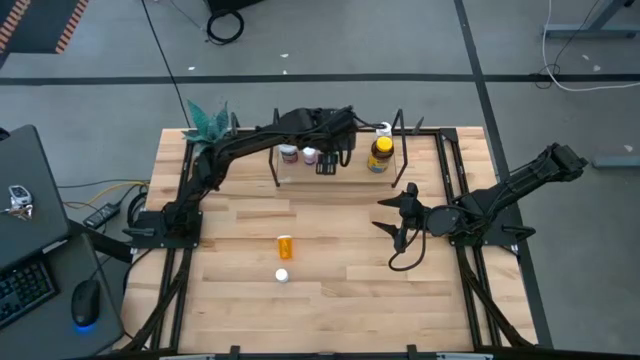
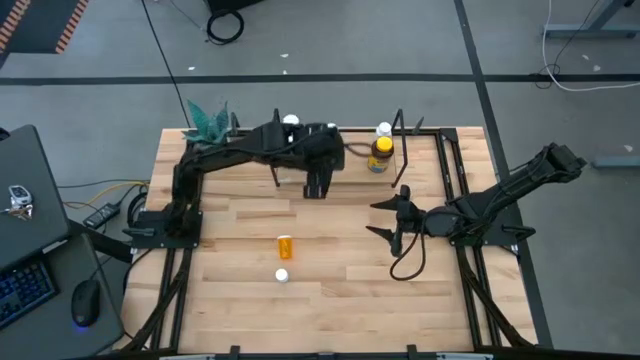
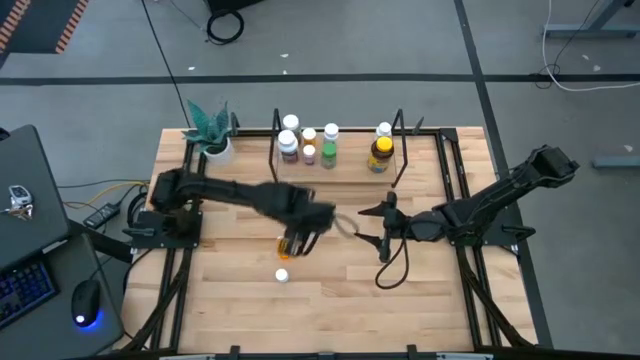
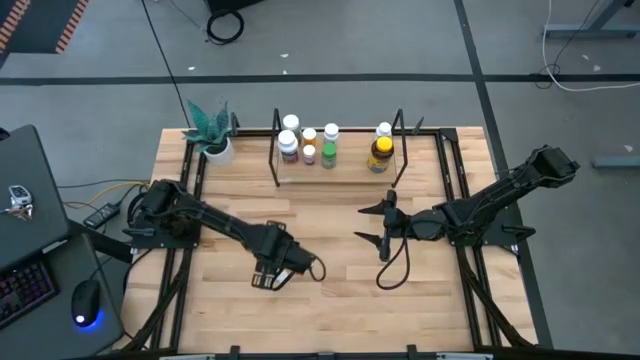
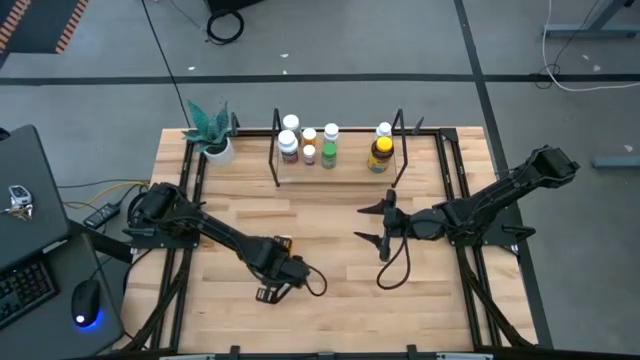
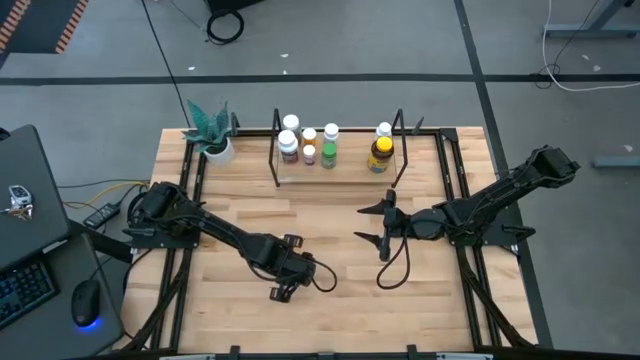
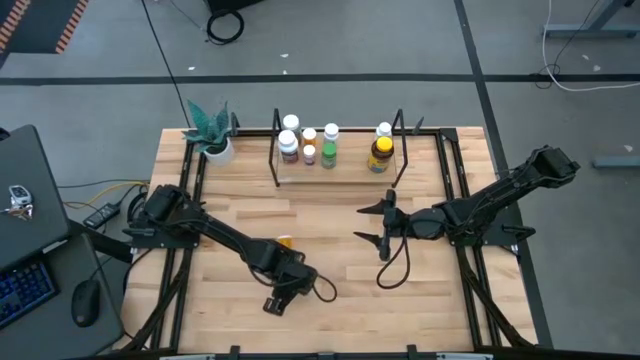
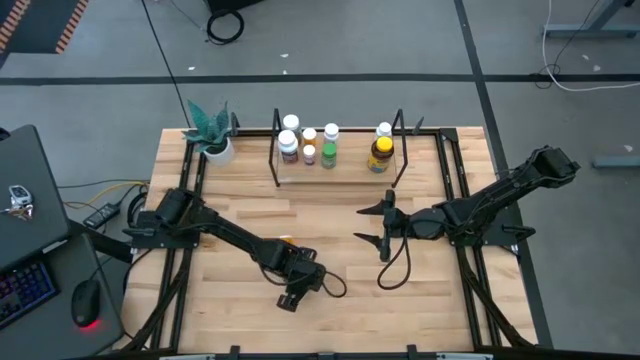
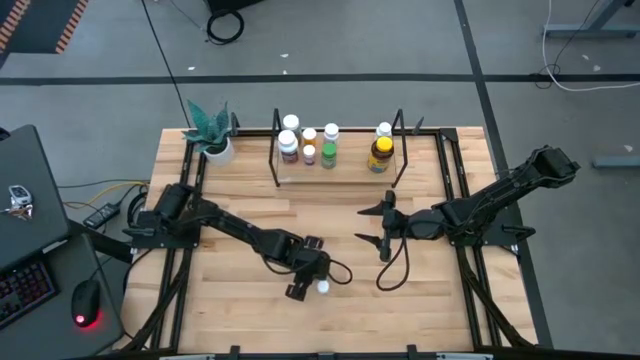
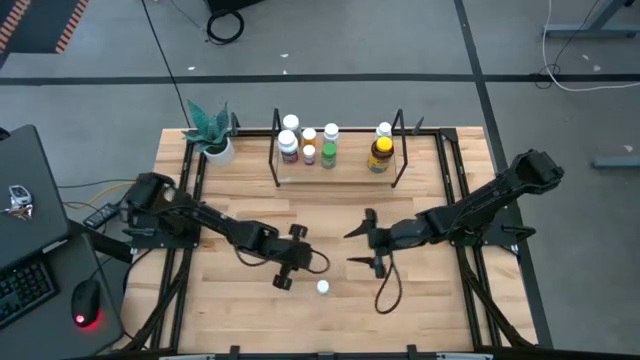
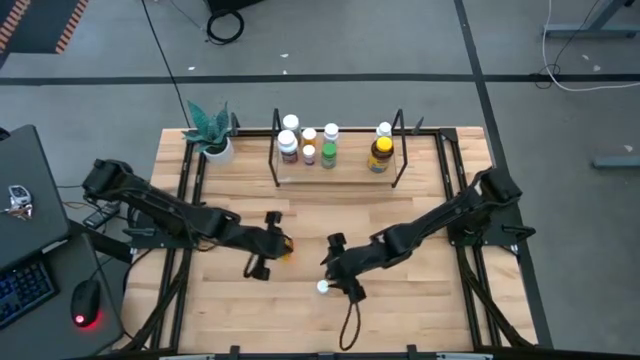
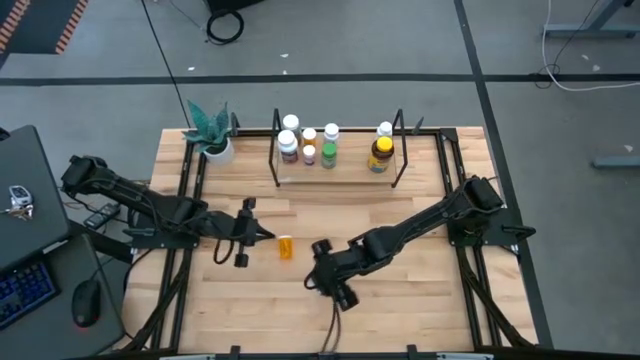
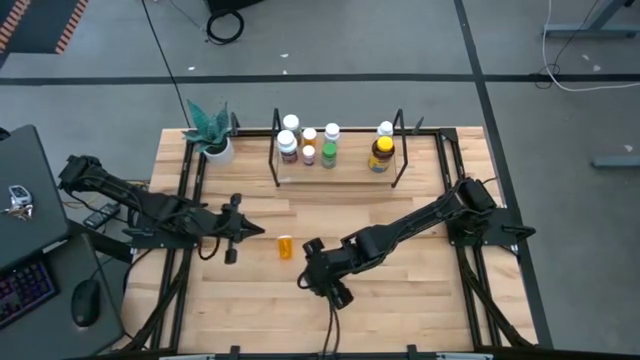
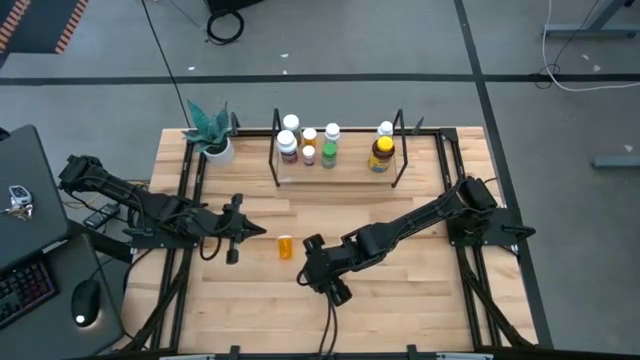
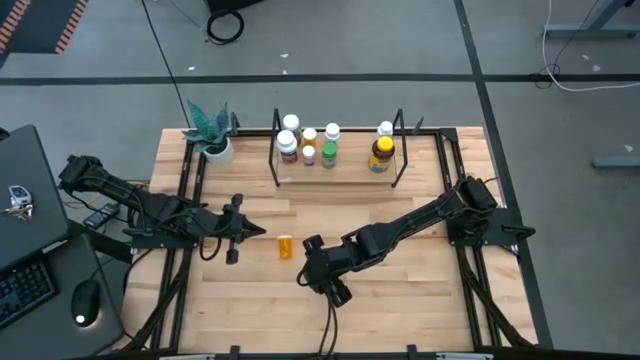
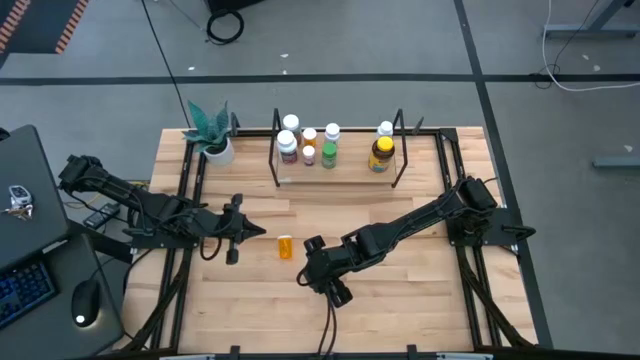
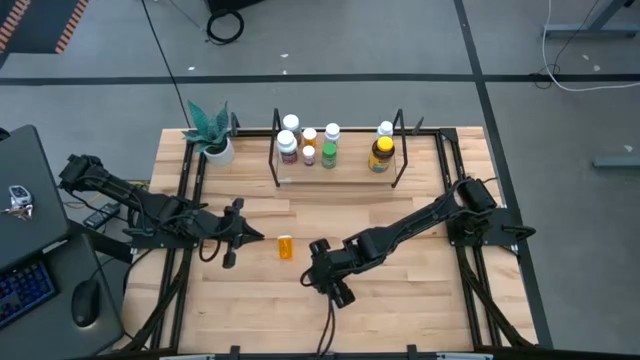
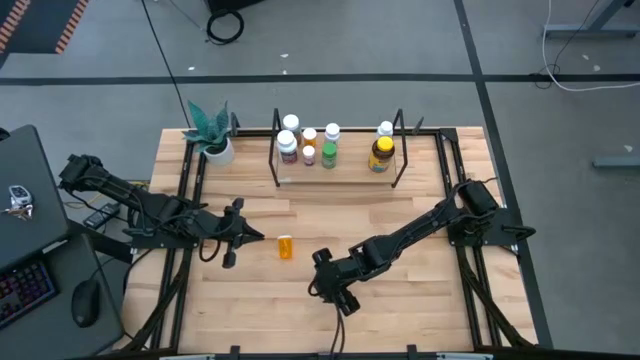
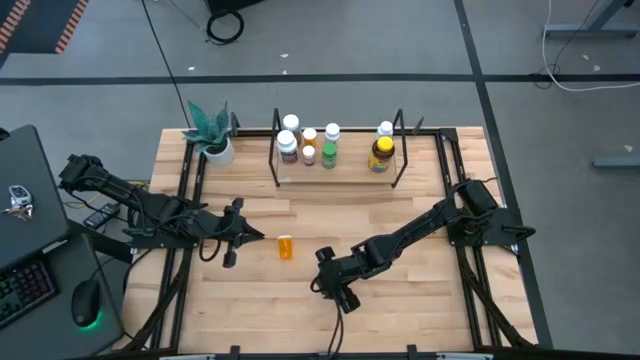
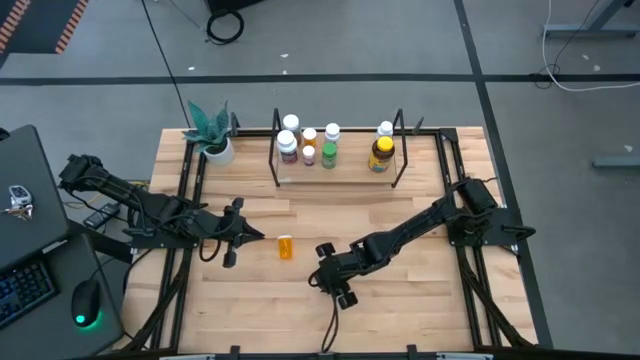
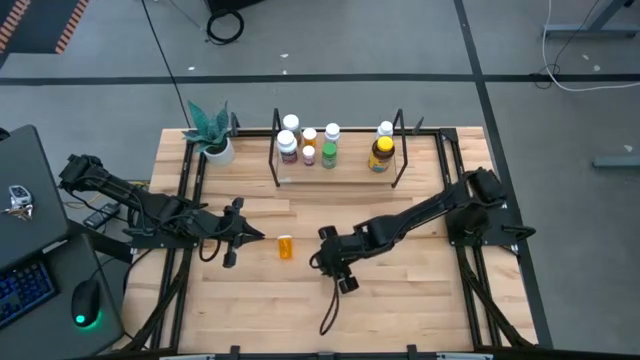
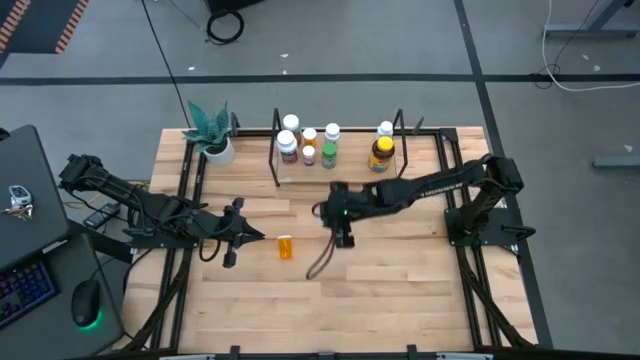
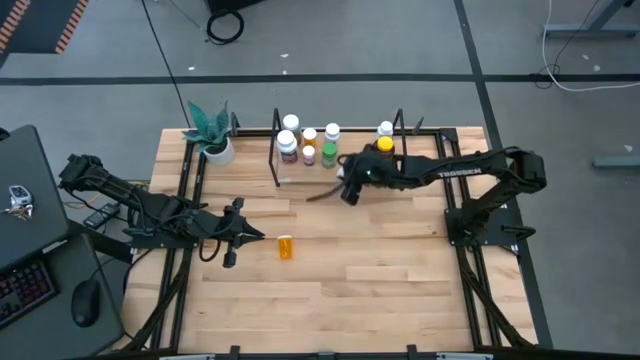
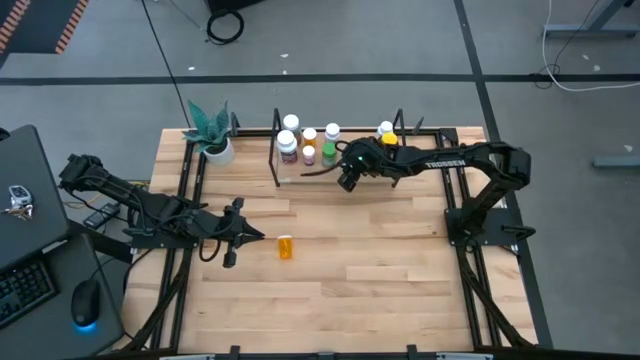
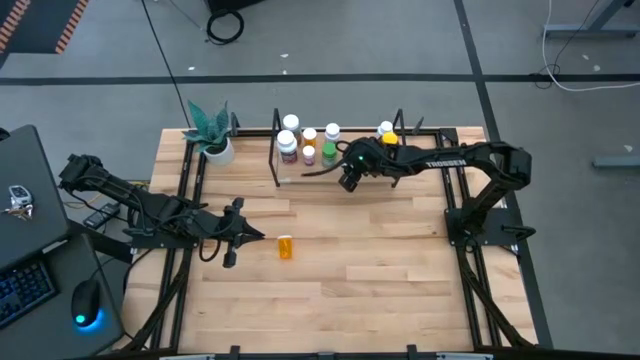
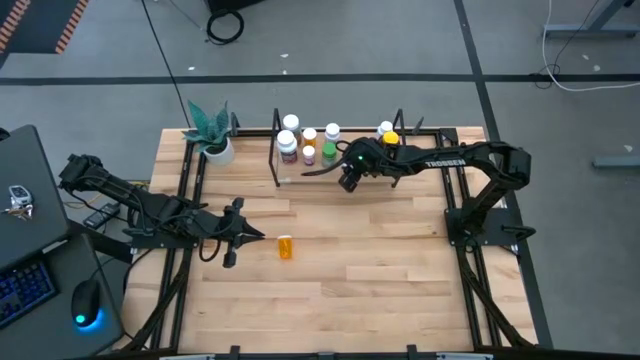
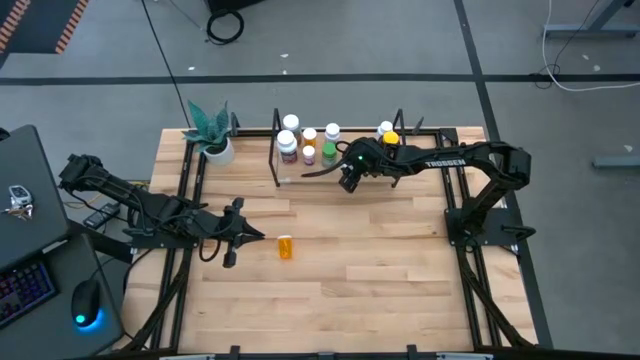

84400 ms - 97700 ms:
Task: Pick and place medicine bottles onto shelf by color
Put the white pill bottle on the shelf

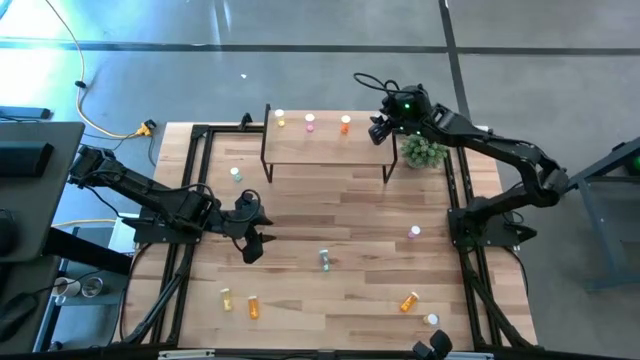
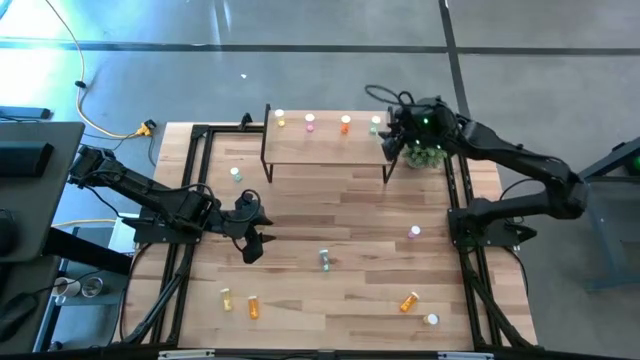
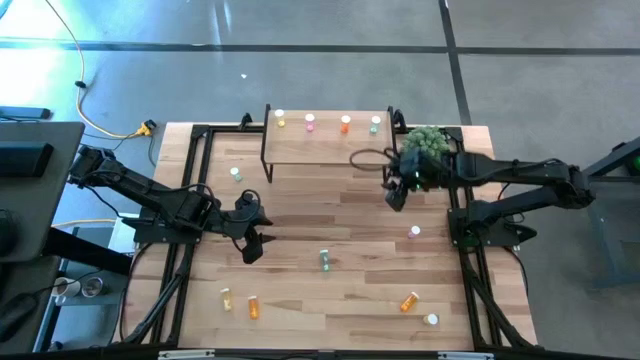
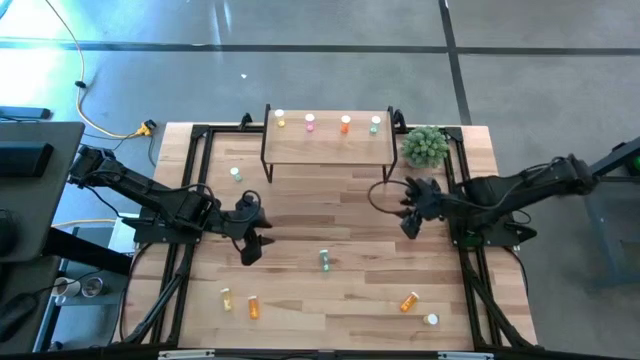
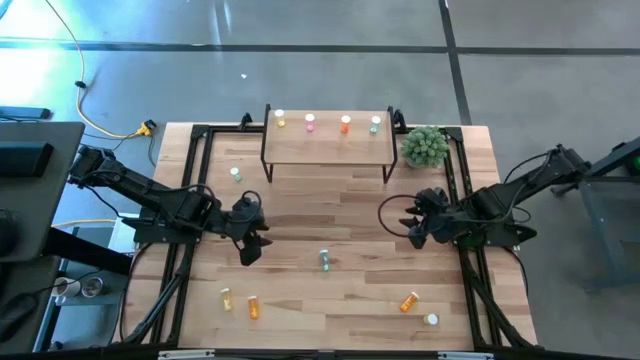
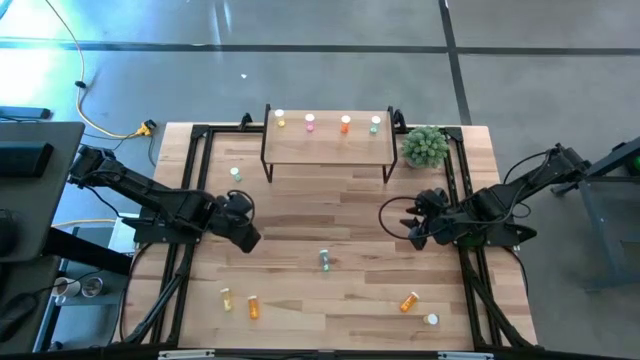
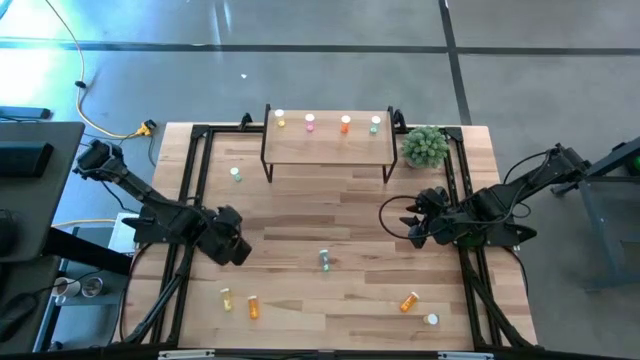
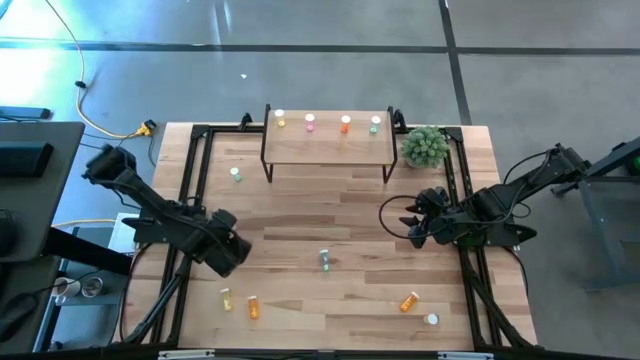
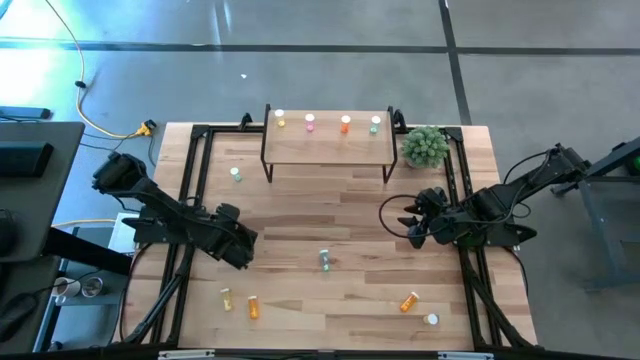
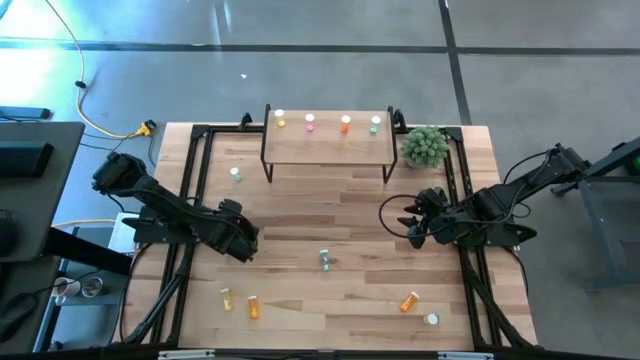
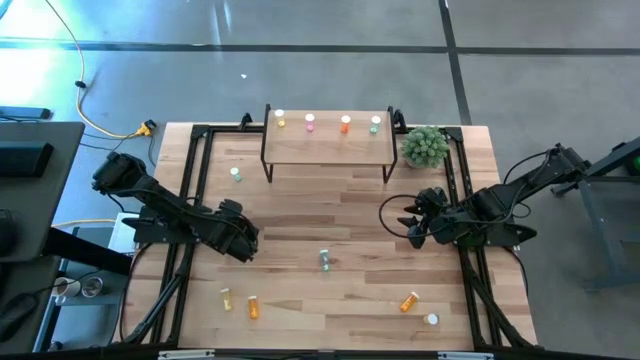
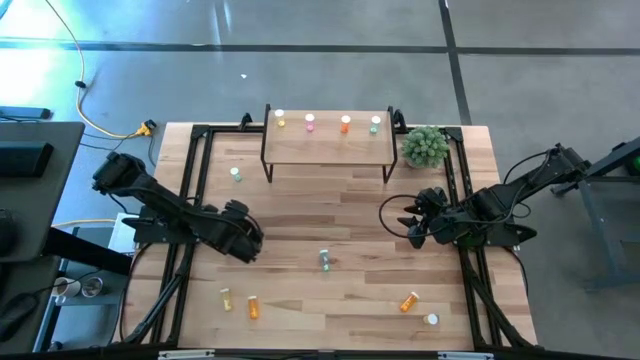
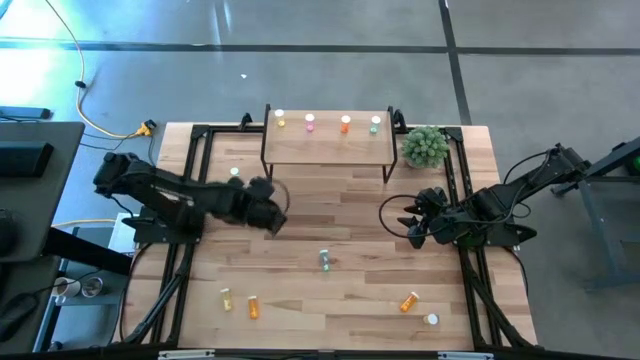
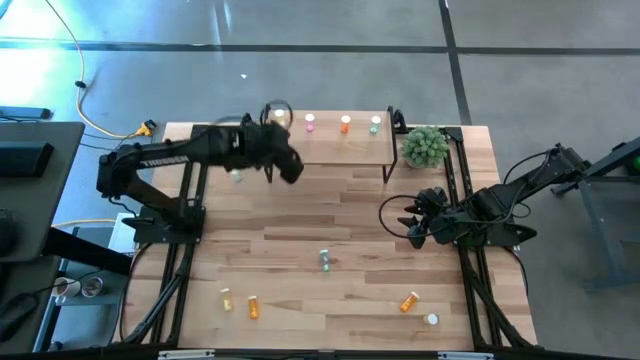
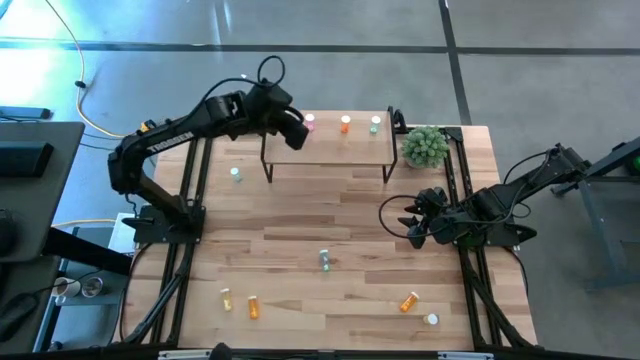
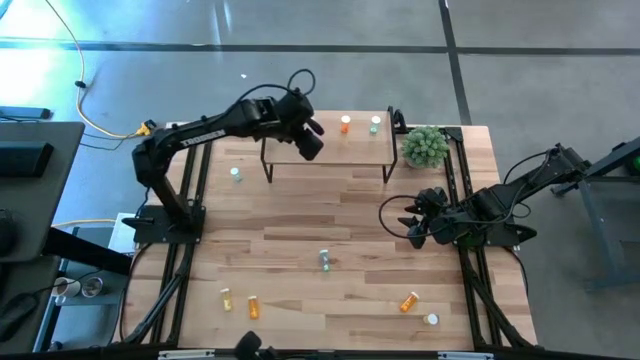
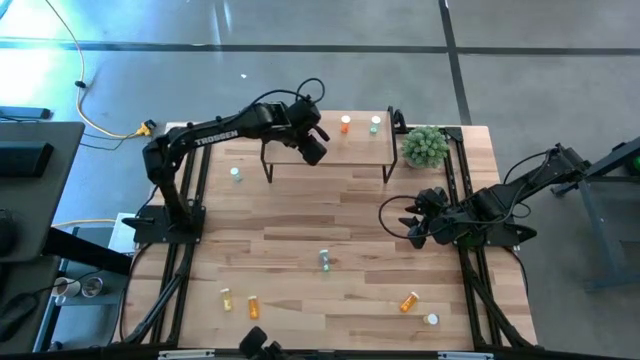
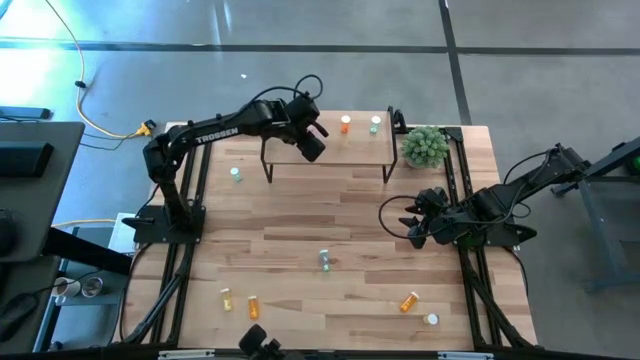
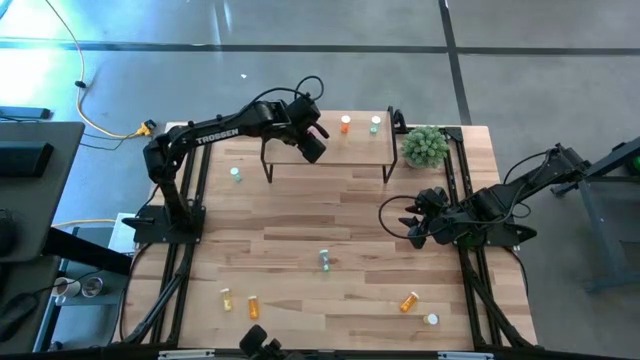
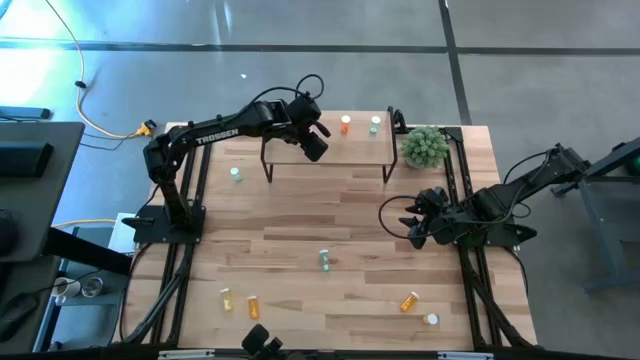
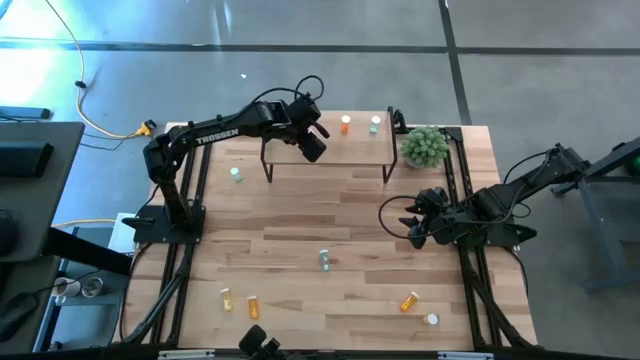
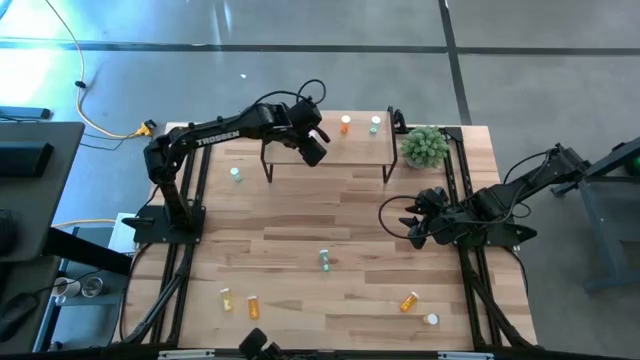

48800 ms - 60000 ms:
Task: Pick and place medicine bottles onto shelf by color
Put the left pink pill bottle on the shelf aligned with the other pink pill bottle
